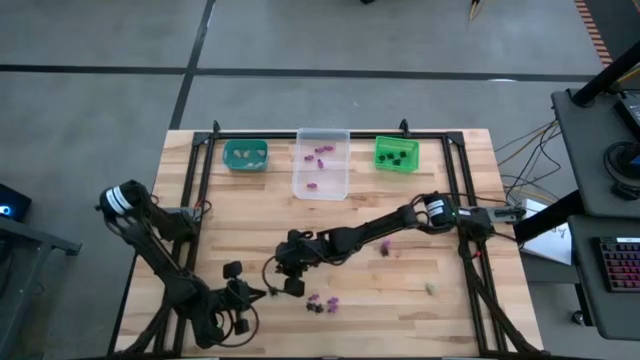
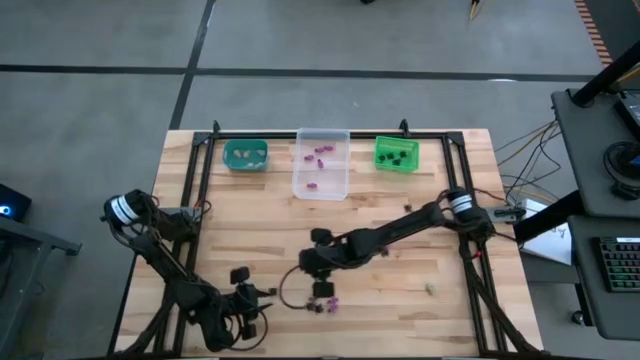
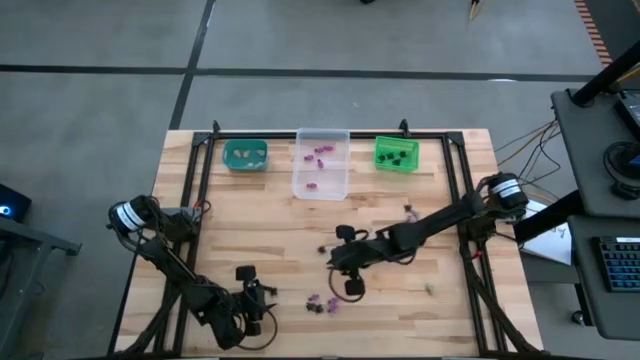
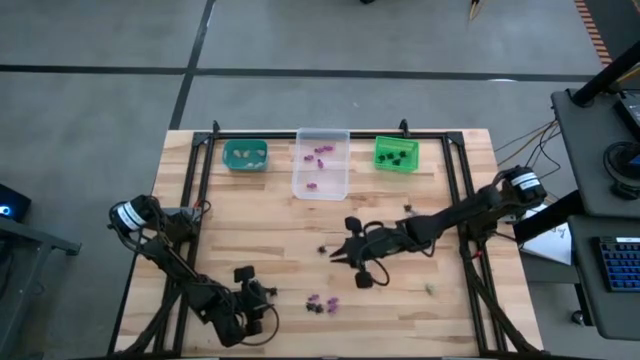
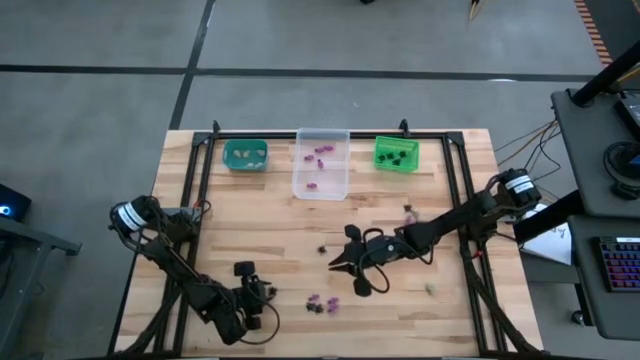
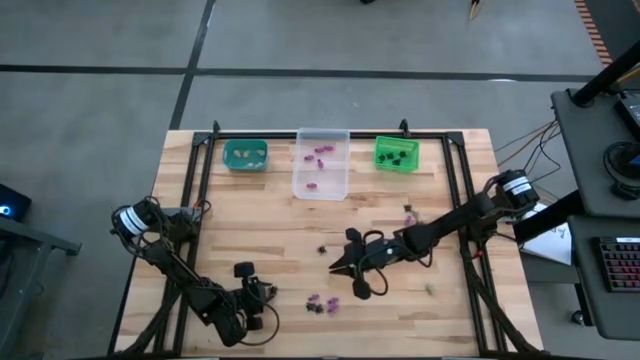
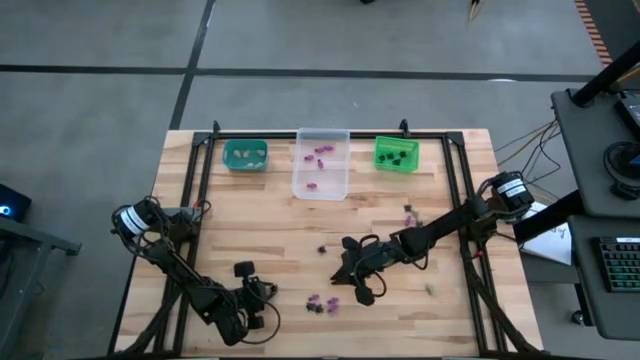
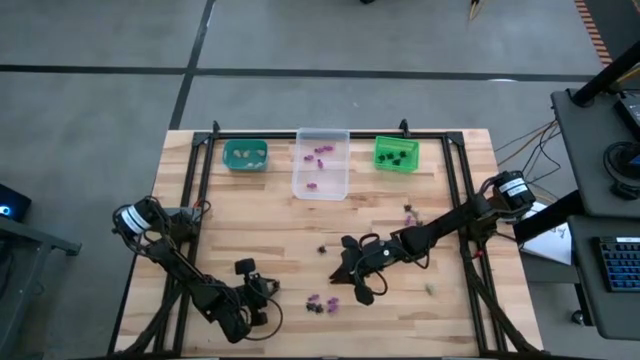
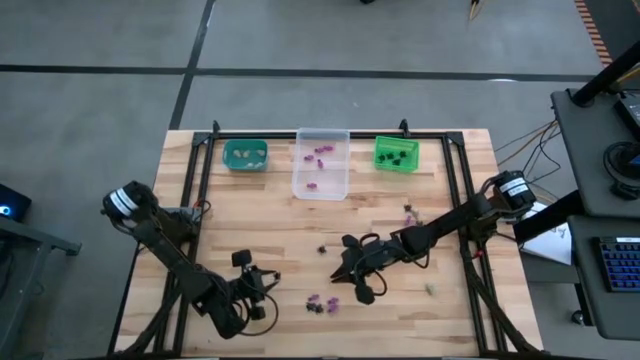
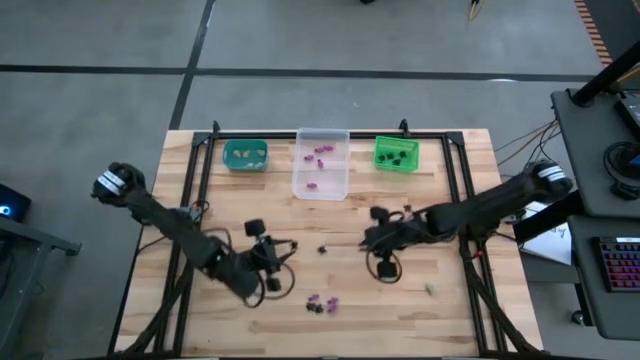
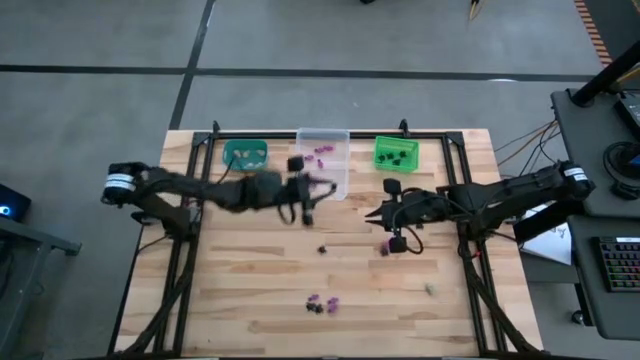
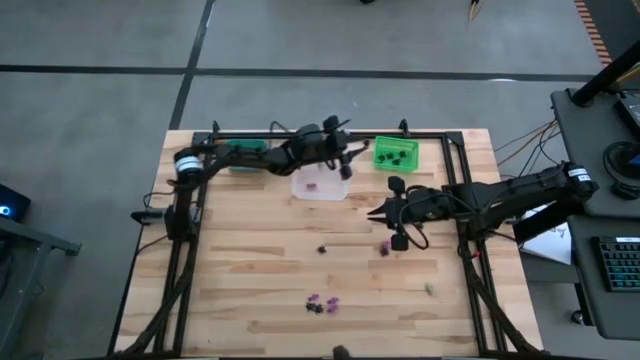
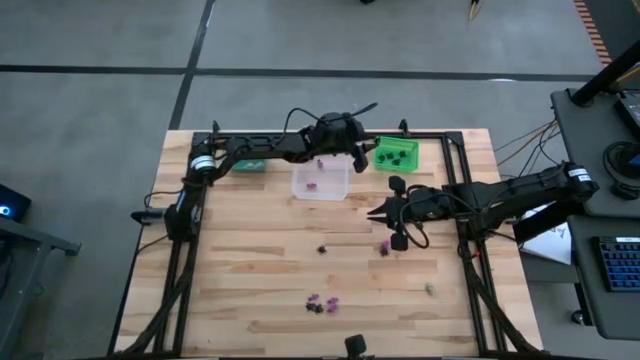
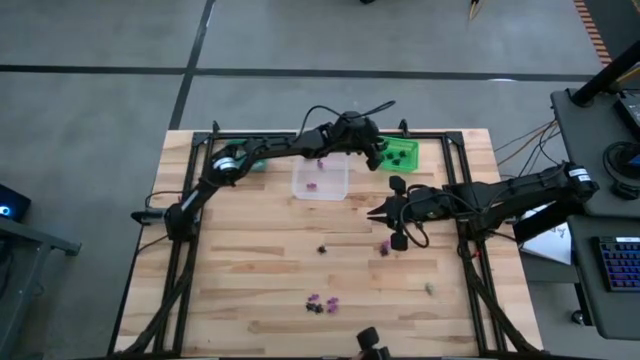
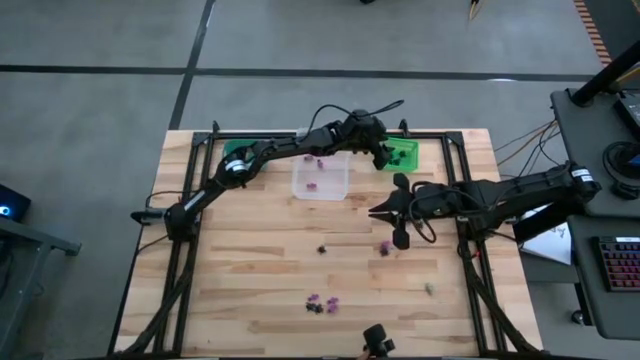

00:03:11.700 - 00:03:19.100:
Task: Sort Halloween decoration
Put the black spider toy into the green bin

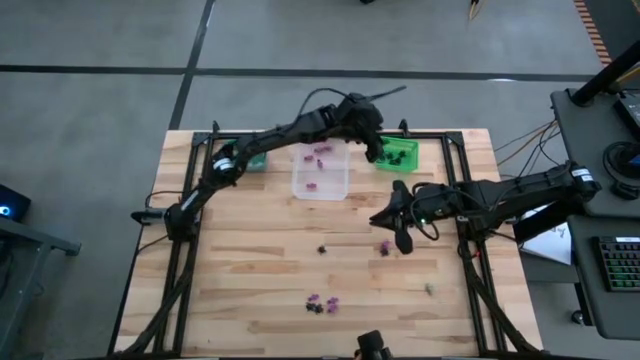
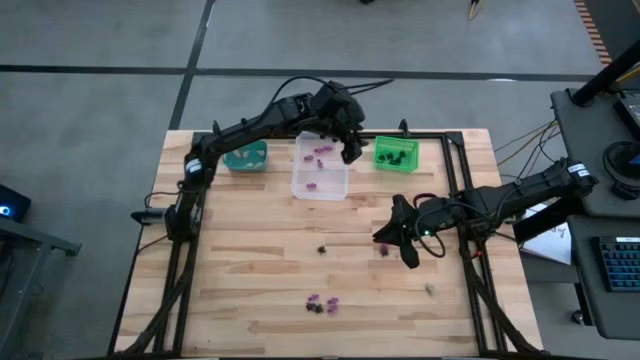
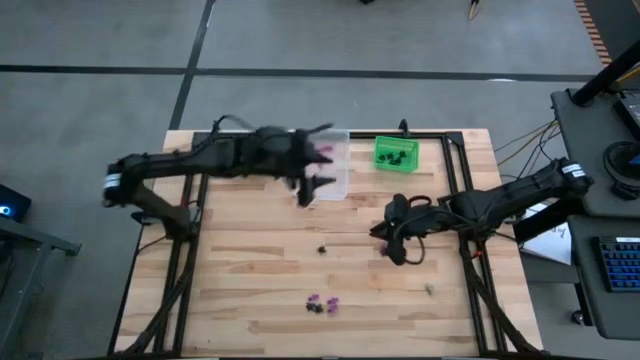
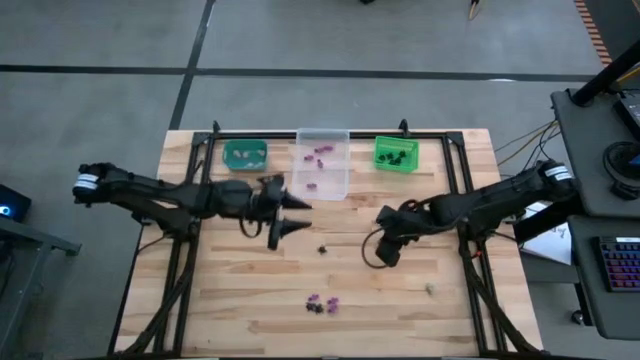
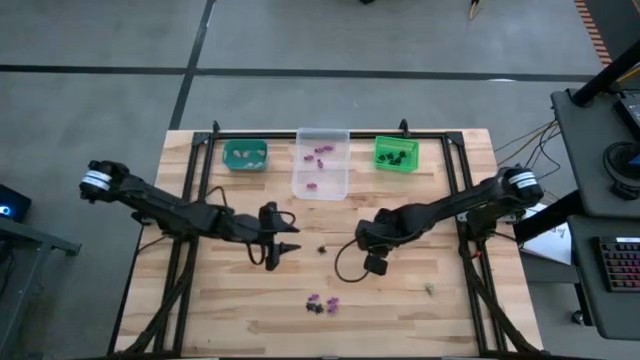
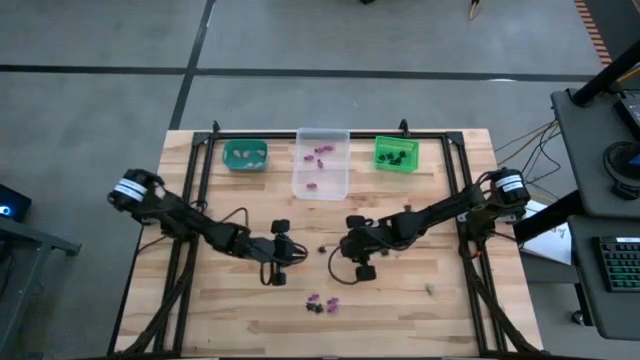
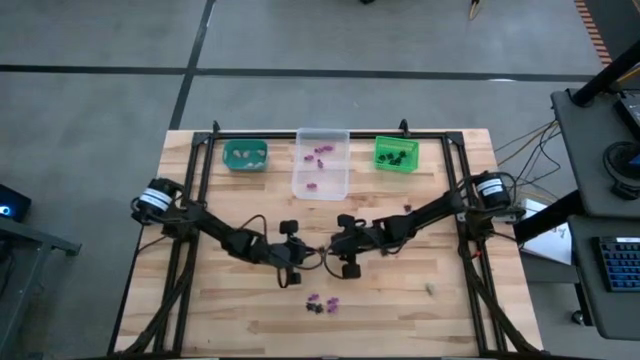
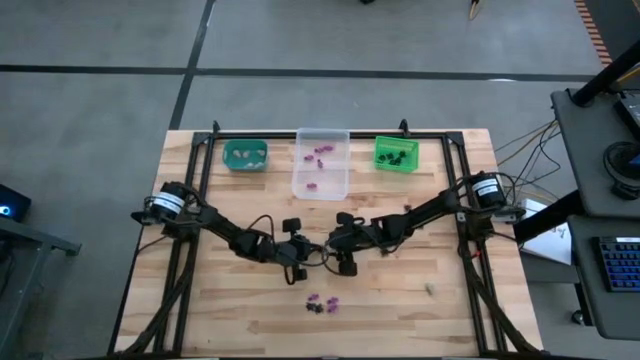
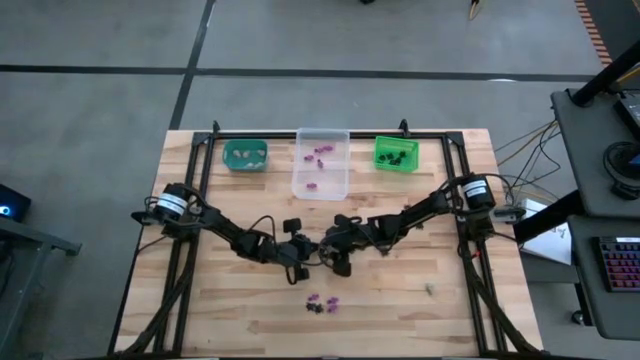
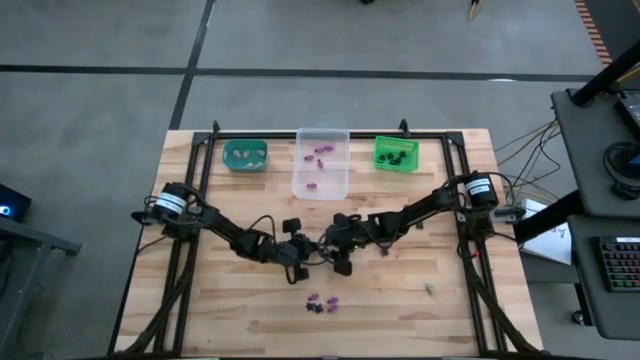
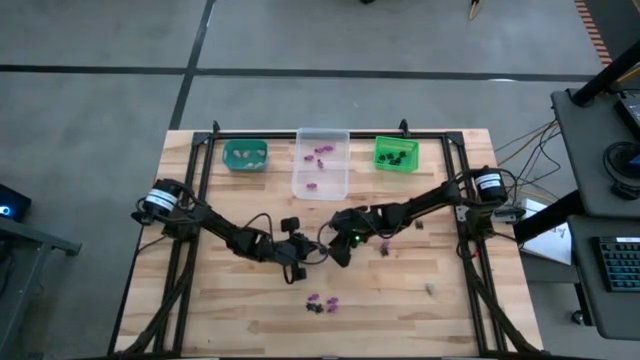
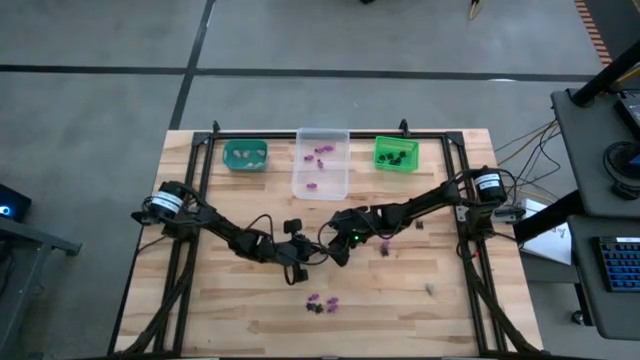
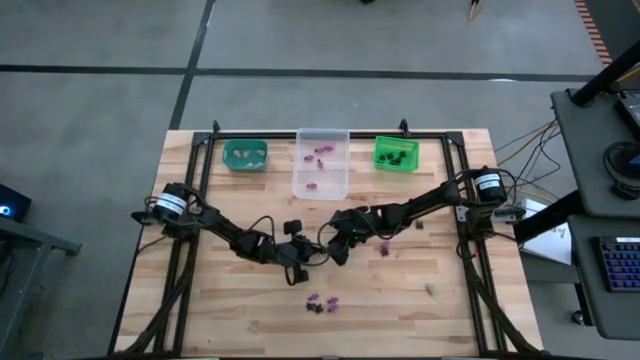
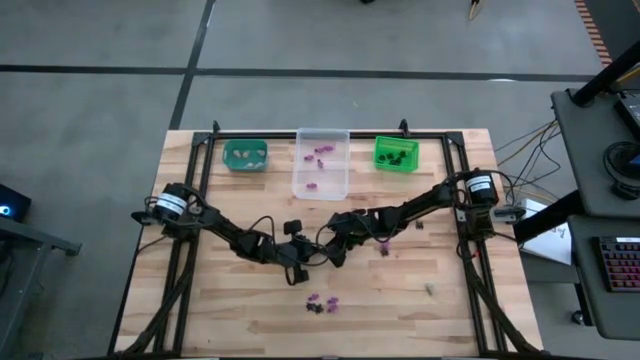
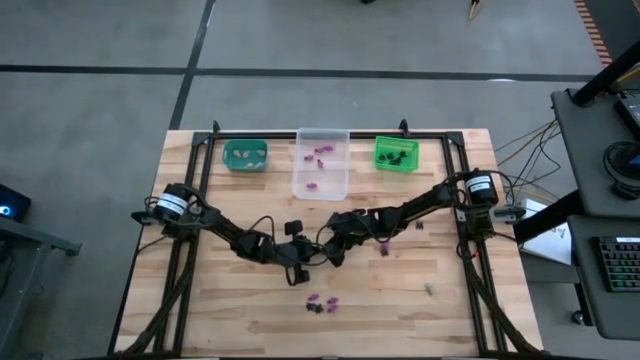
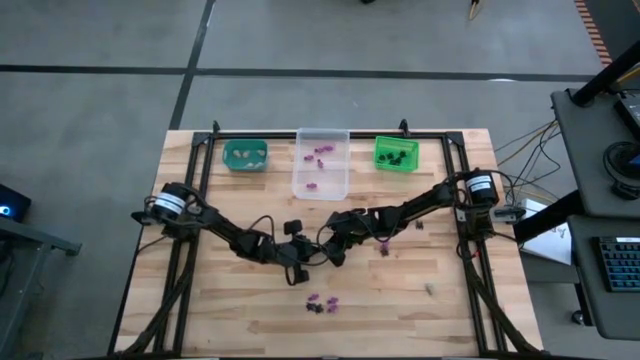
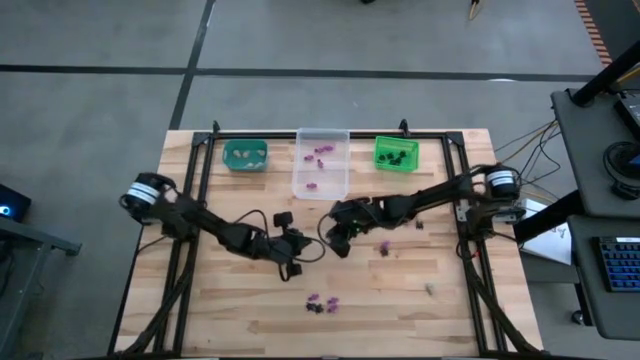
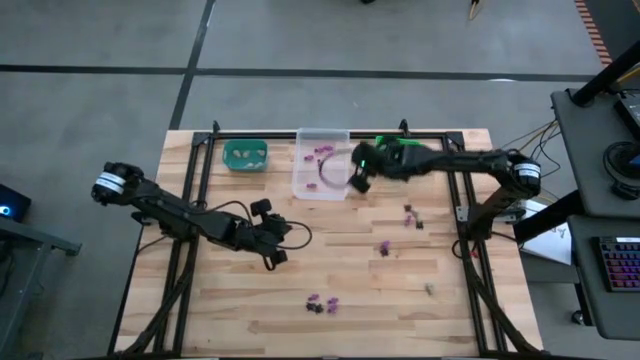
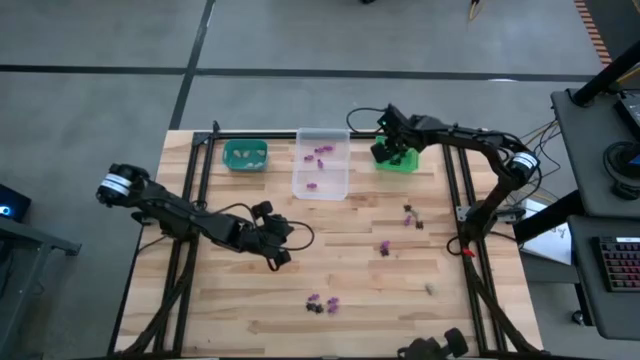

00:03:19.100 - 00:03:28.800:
Put the black spider toy into the green bin

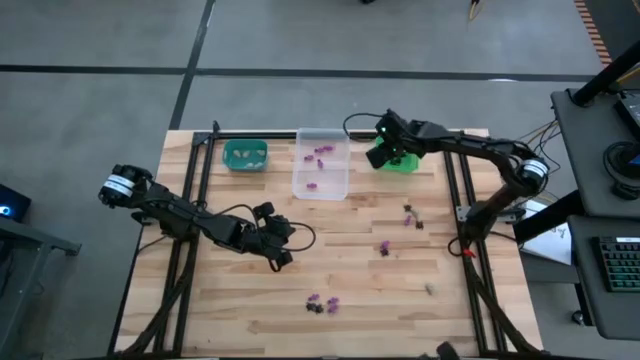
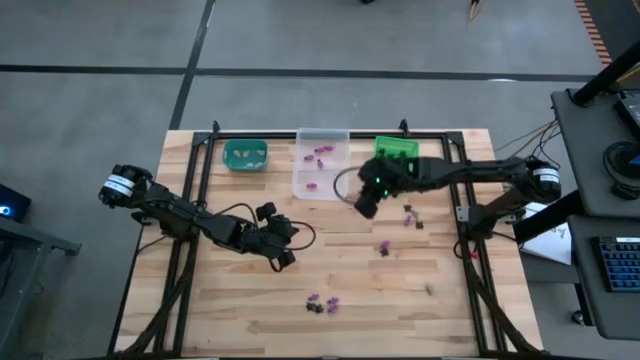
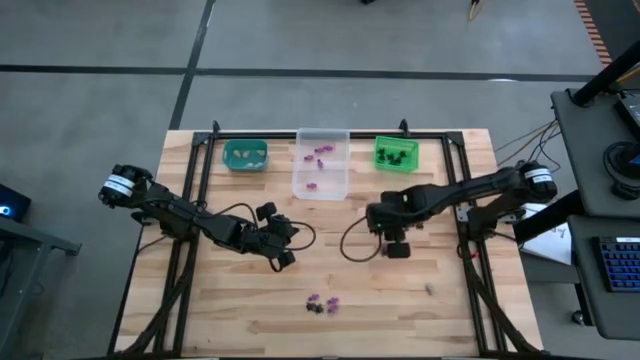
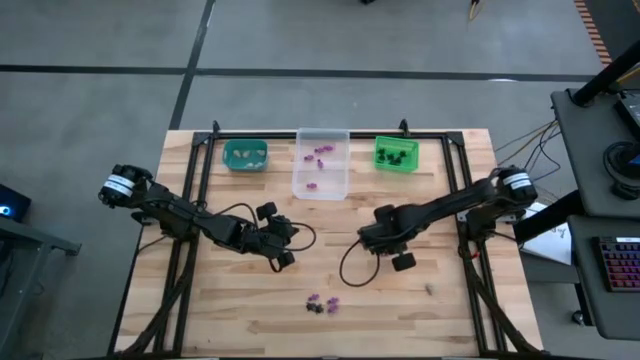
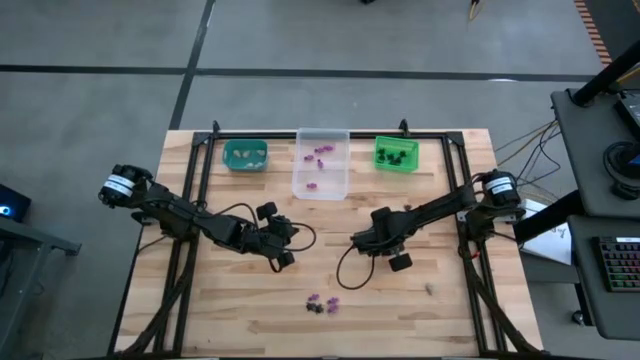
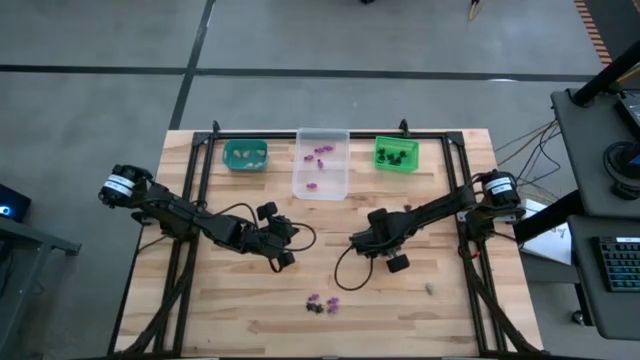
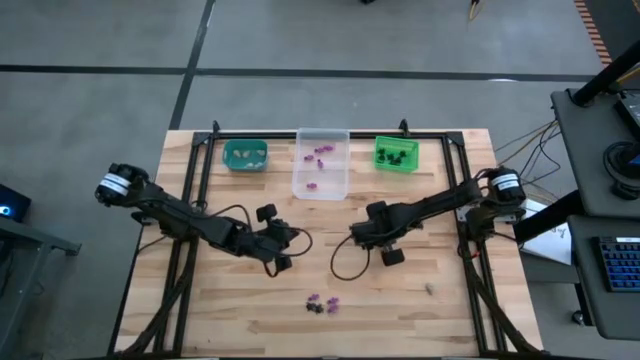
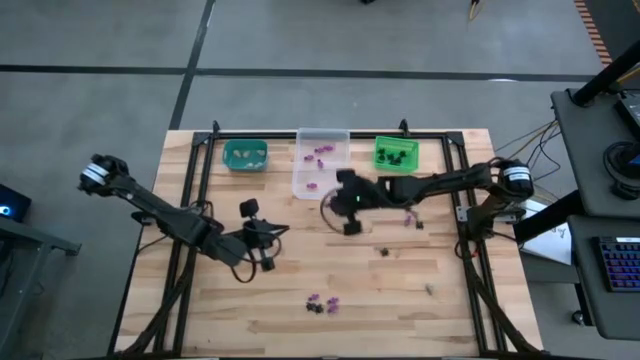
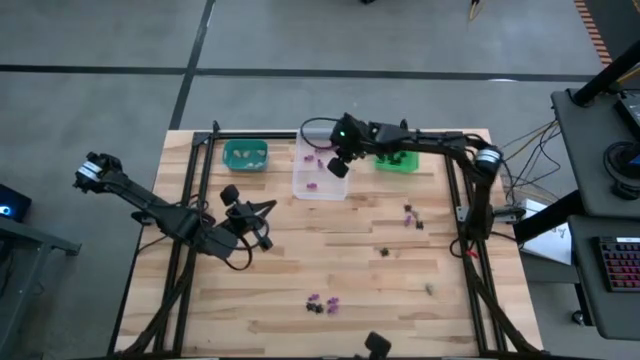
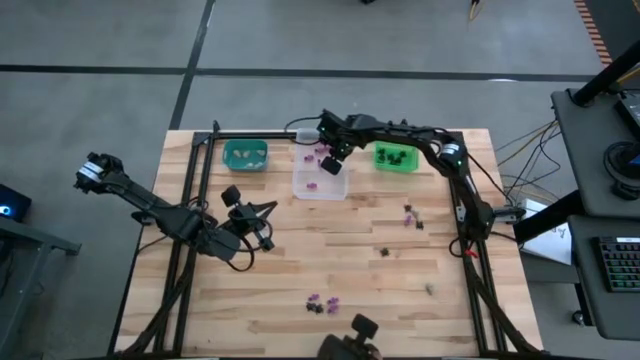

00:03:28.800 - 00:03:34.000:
Put the violet skeleton toy into the transparent bin

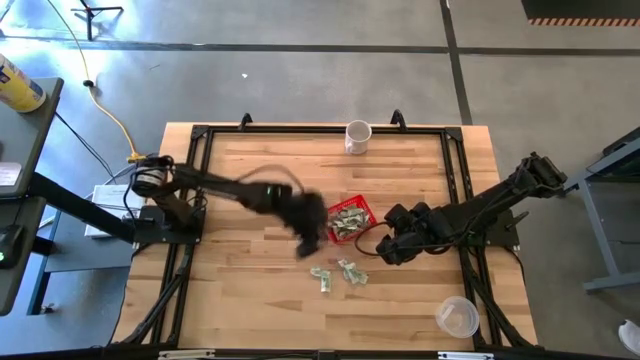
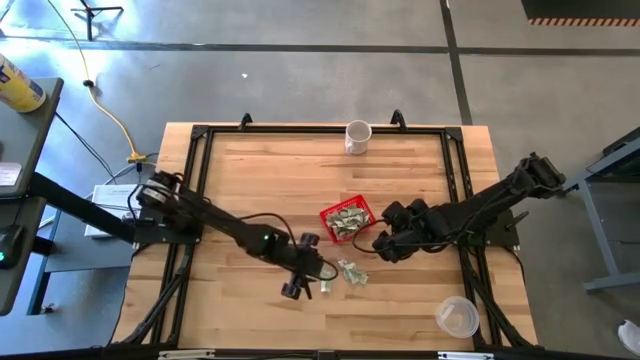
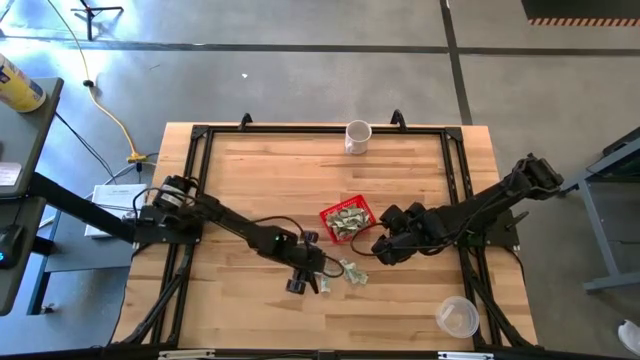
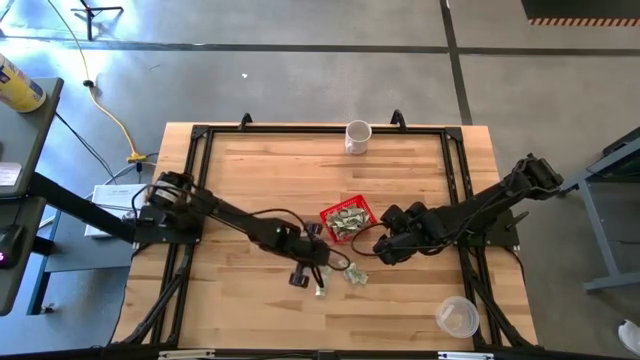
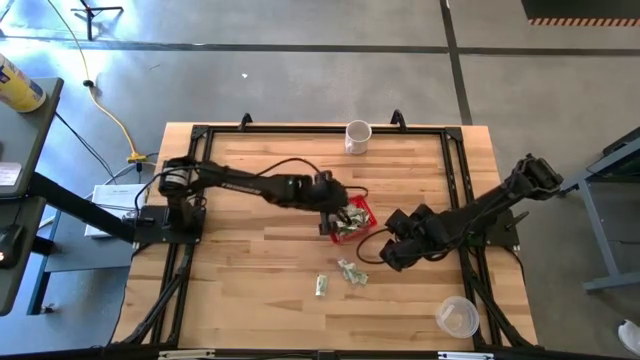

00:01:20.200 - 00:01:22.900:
Task: Pick and place items into bin
Put the white stevia packet into the red bin
